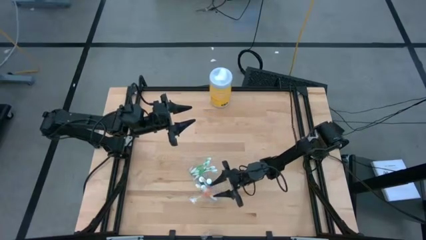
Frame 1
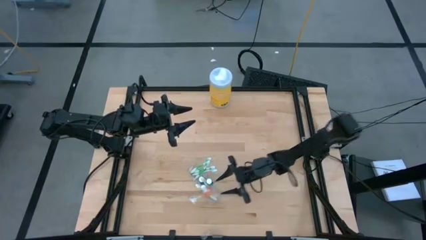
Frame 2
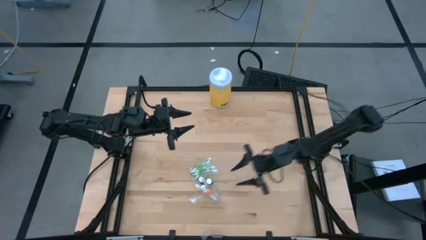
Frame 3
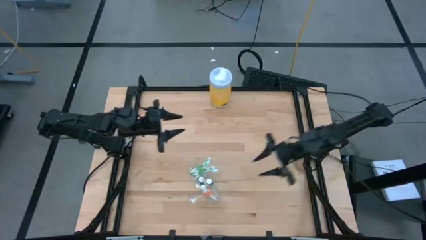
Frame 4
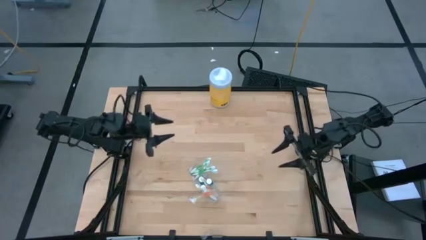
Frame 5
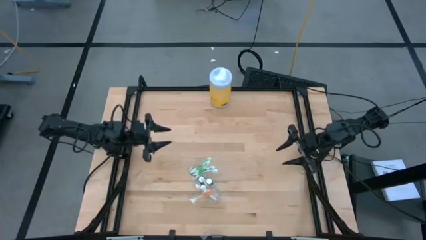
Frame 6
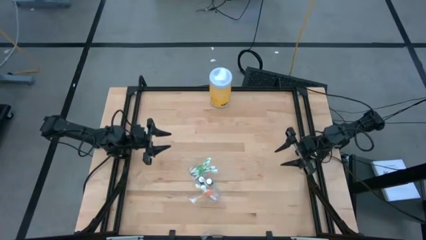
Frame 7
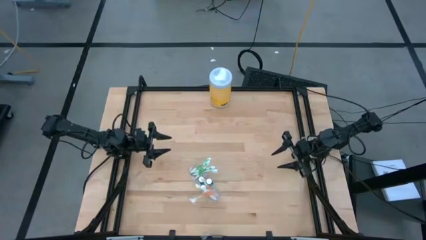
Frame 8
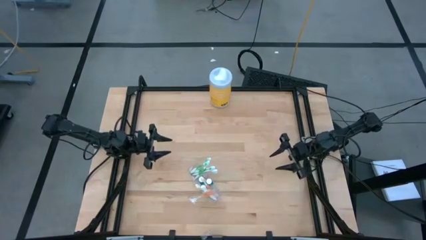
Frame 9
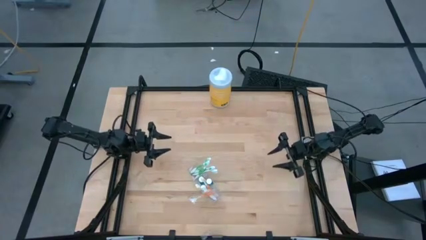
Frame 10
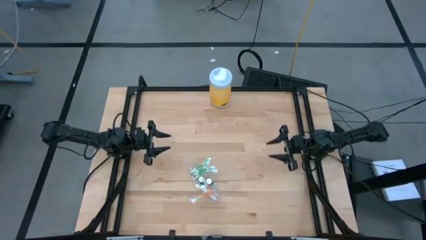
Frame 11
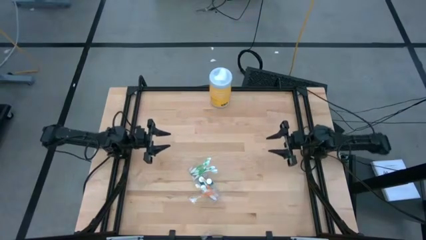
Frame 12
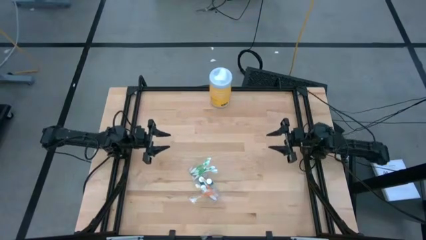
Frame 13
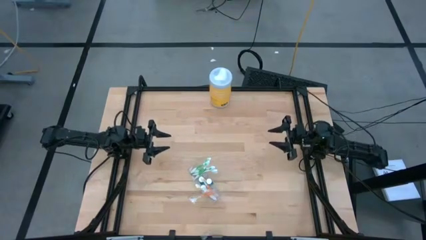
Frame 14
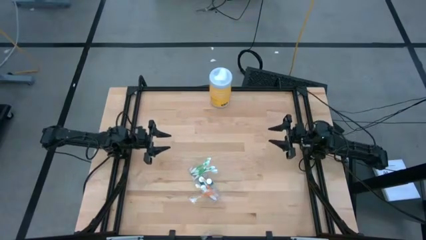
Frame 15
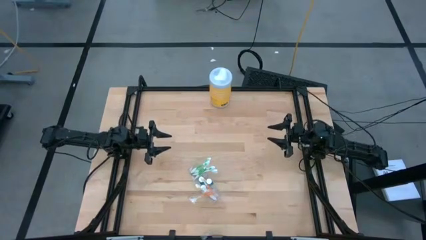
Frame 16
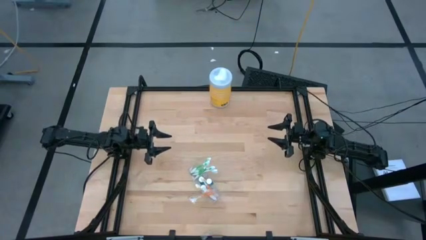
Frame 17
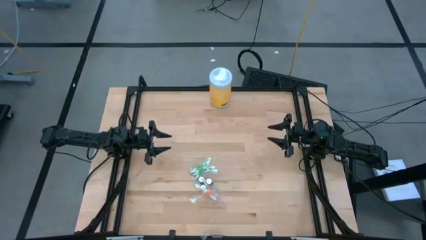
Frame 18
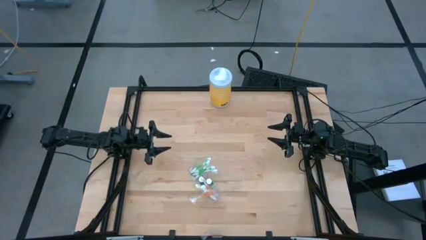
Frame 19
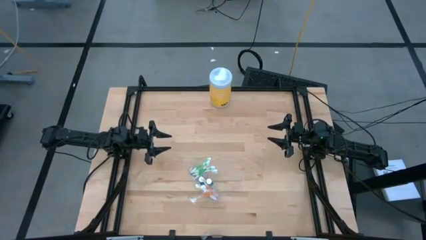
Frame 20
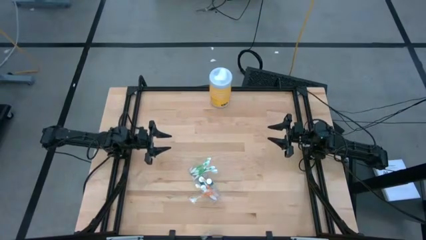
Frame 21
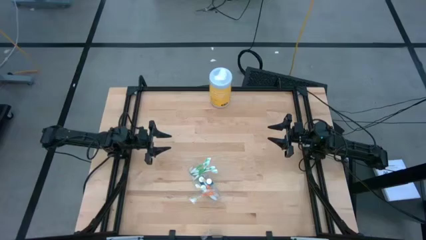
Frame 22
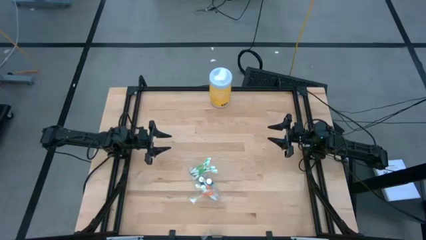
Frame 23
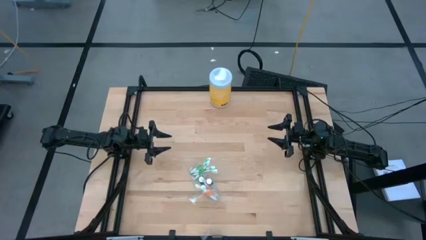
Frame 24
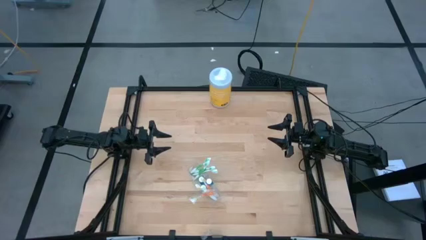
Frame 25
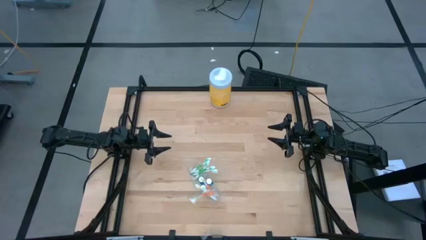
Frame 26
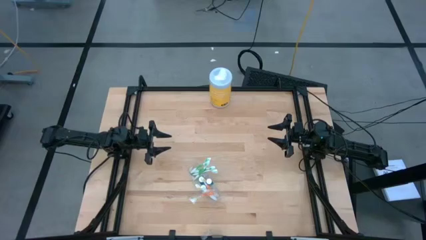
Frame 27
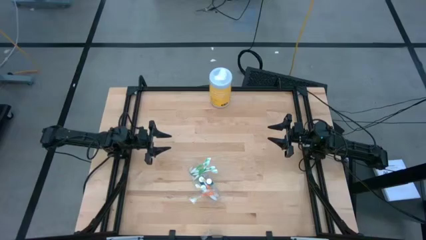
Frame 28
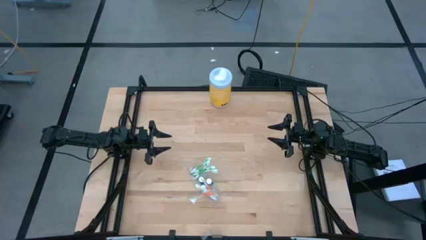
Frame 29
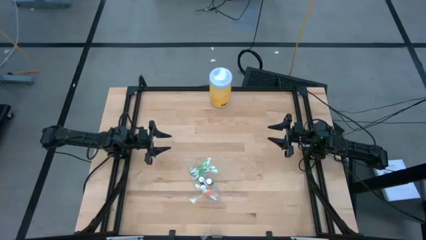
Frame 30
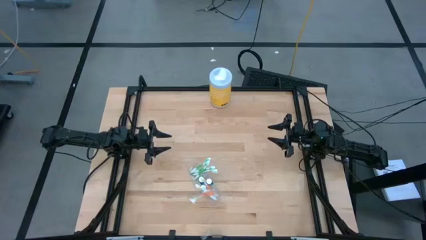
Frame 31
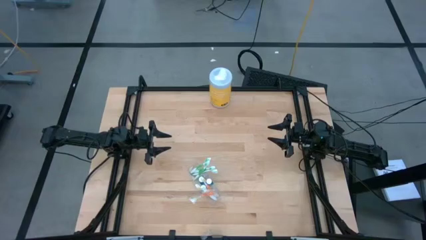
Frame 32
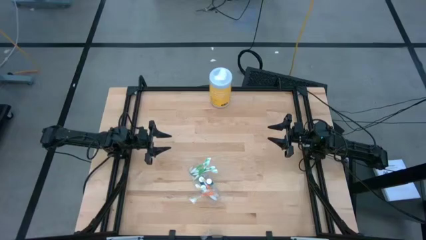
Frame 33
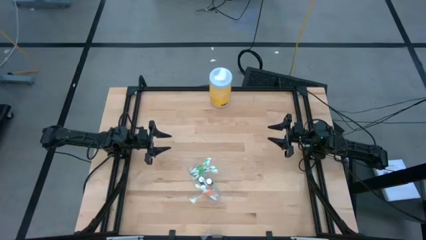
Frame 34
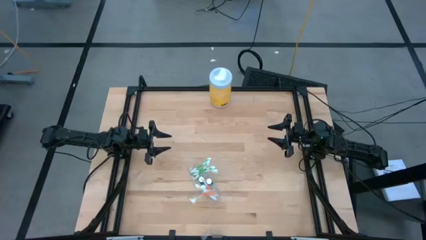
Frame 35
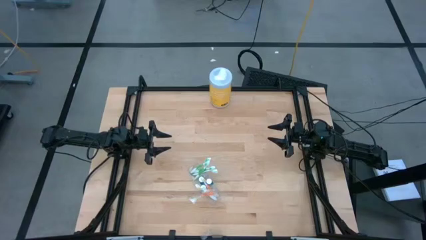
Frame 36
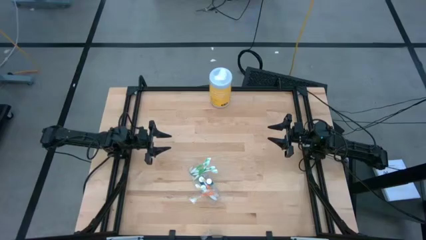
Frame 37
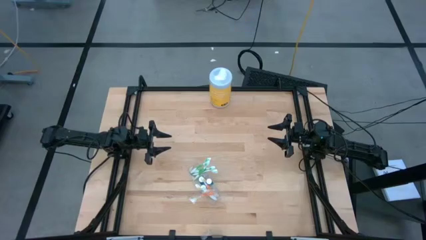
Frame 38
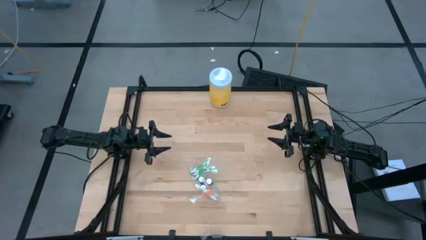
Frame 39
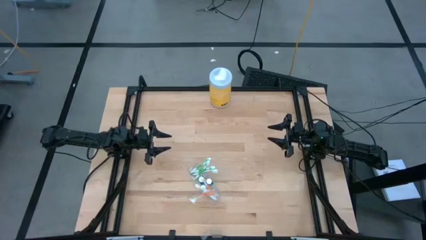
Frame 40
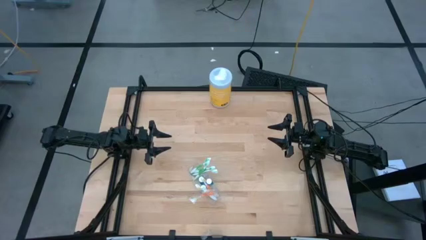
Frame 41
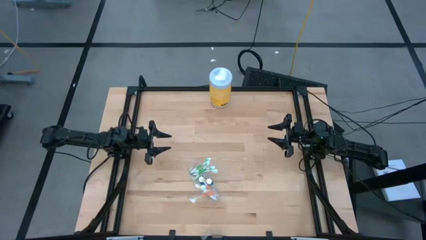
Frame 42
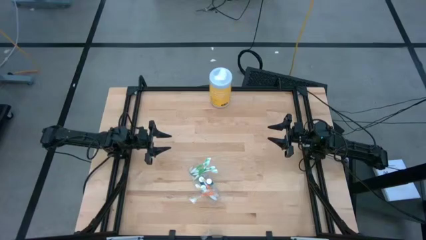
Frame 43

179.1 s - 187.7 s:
Task: Pick & Place toothbrushing station
Return to Home Position

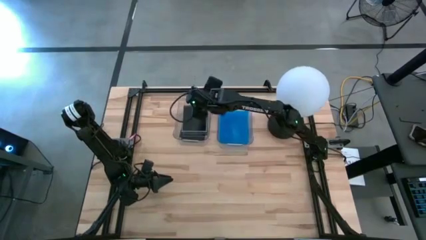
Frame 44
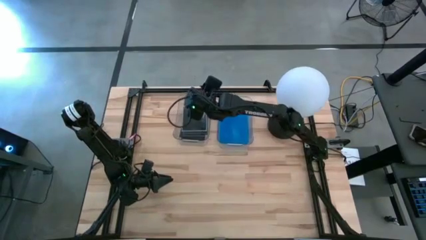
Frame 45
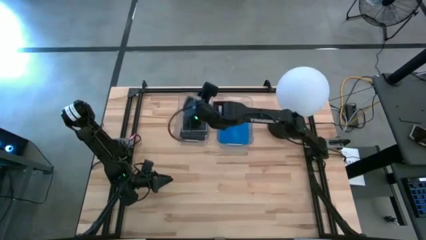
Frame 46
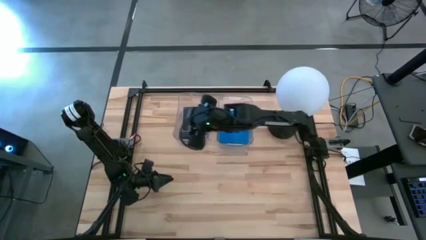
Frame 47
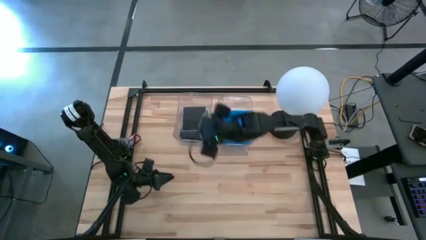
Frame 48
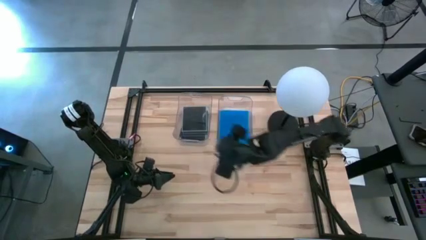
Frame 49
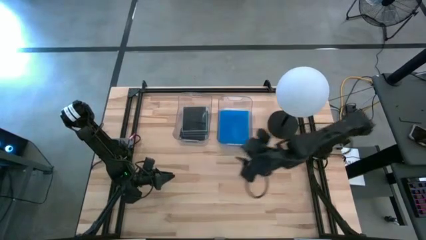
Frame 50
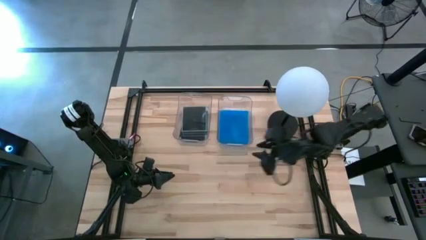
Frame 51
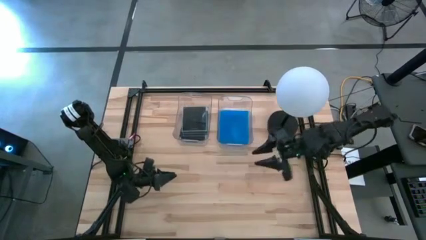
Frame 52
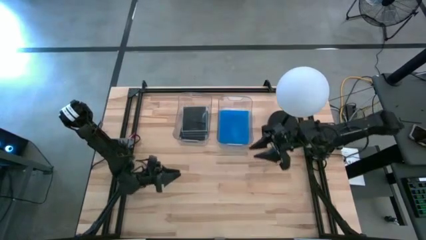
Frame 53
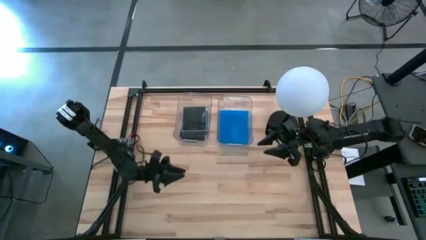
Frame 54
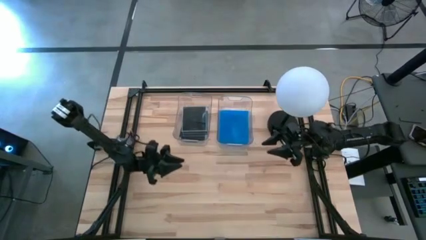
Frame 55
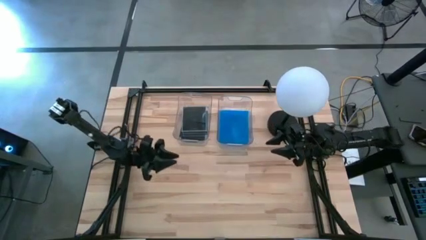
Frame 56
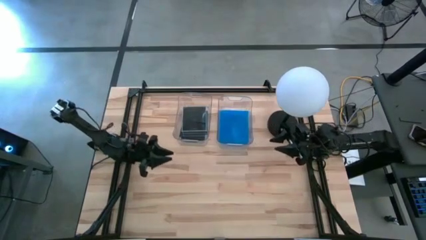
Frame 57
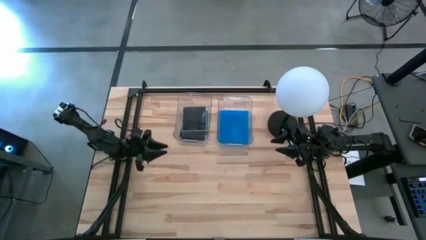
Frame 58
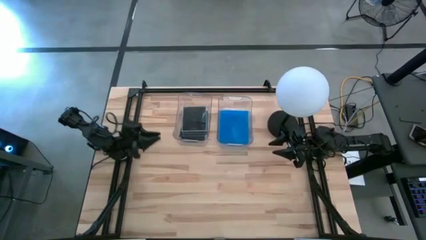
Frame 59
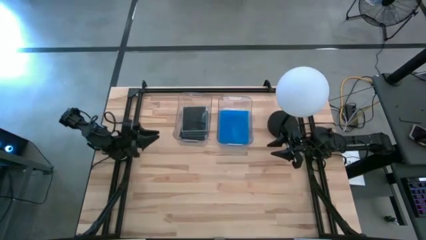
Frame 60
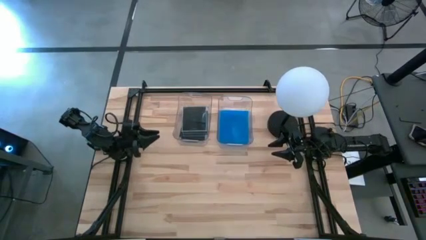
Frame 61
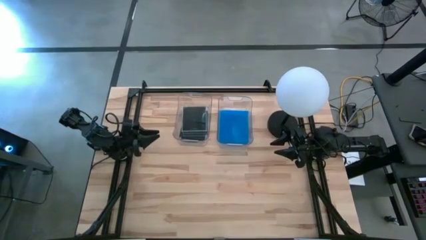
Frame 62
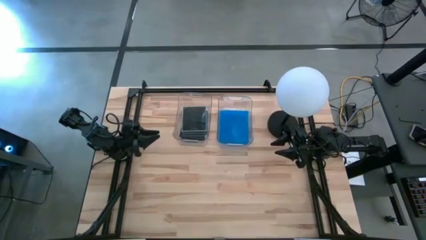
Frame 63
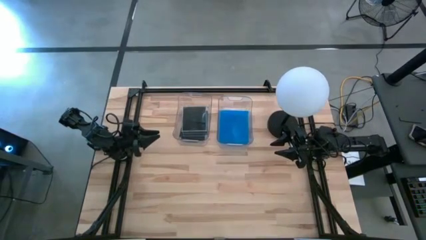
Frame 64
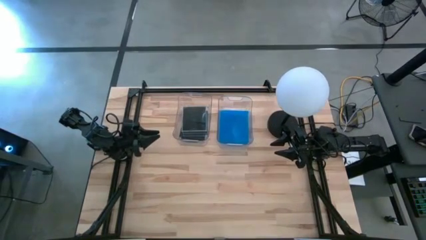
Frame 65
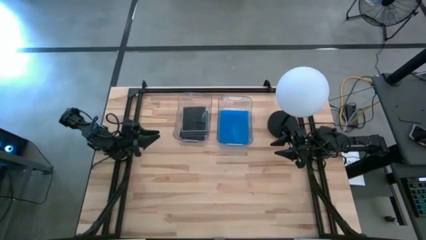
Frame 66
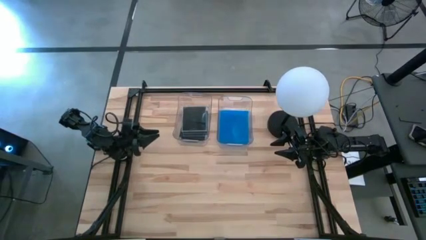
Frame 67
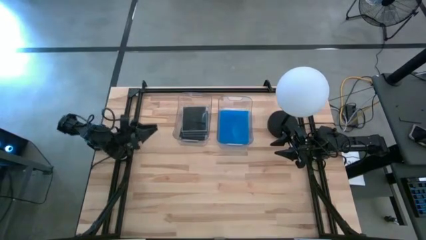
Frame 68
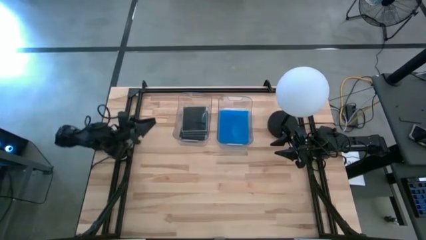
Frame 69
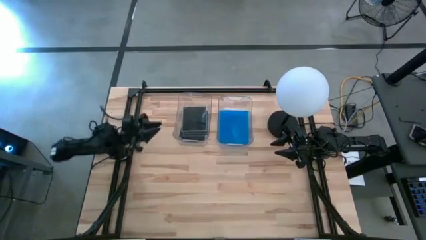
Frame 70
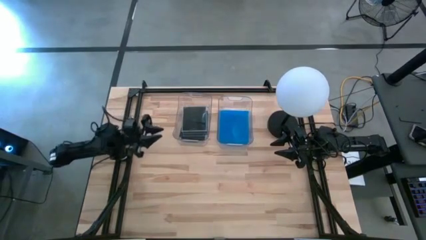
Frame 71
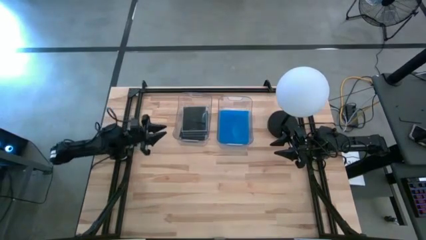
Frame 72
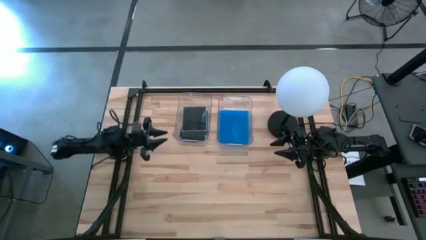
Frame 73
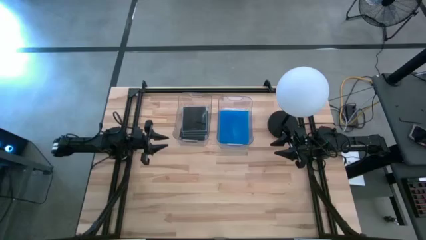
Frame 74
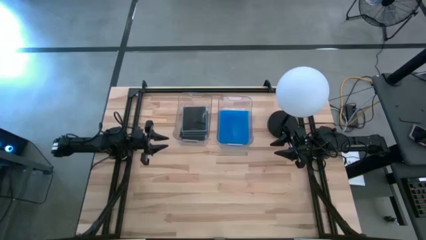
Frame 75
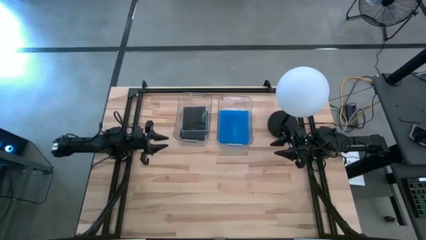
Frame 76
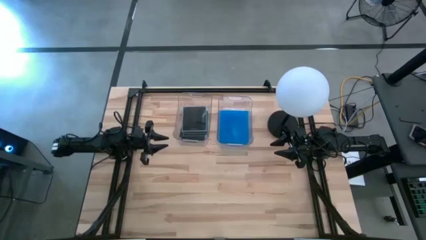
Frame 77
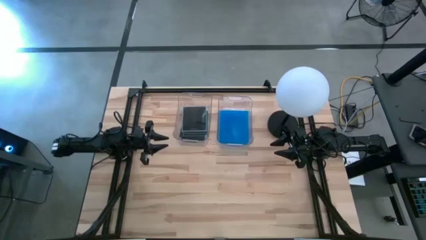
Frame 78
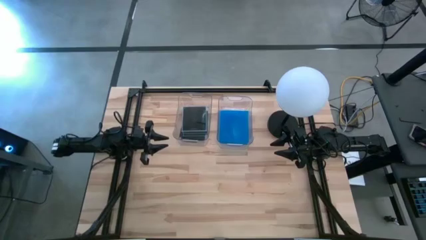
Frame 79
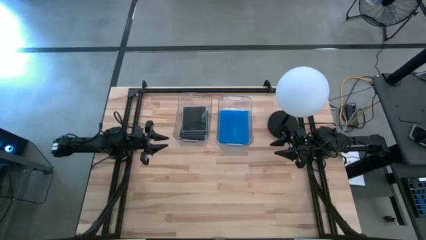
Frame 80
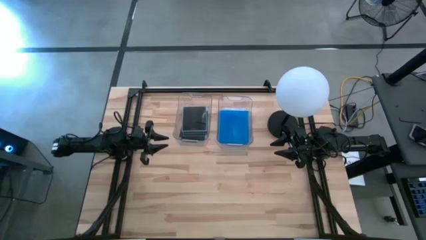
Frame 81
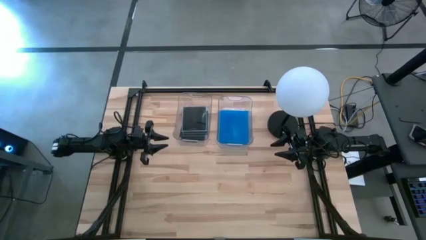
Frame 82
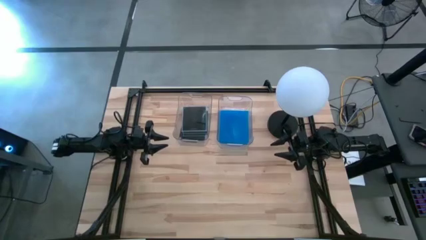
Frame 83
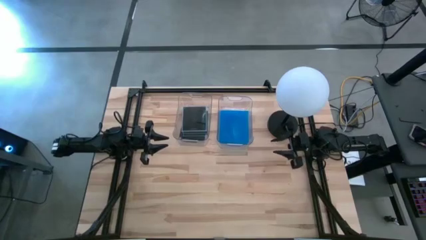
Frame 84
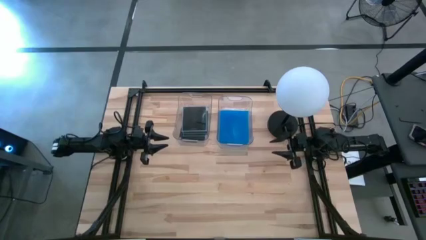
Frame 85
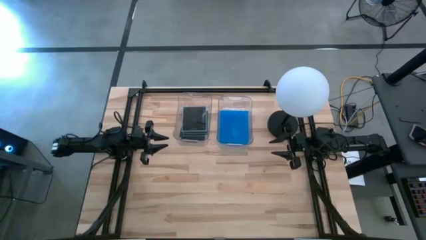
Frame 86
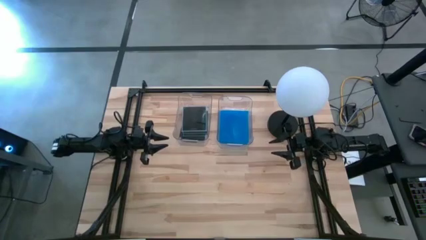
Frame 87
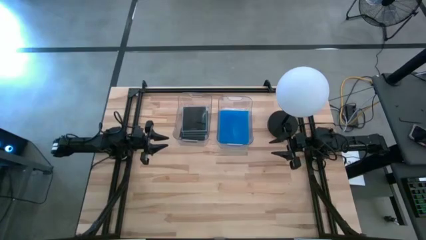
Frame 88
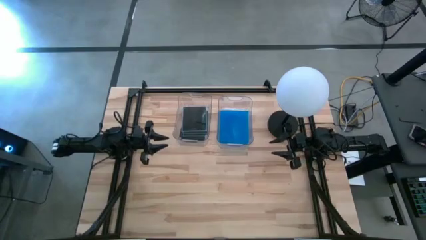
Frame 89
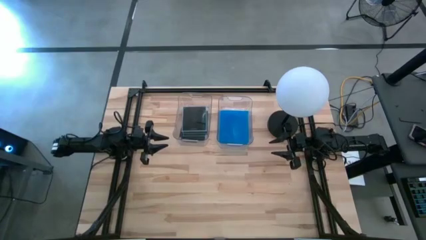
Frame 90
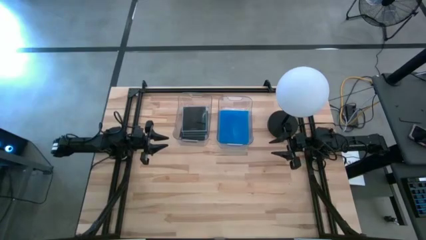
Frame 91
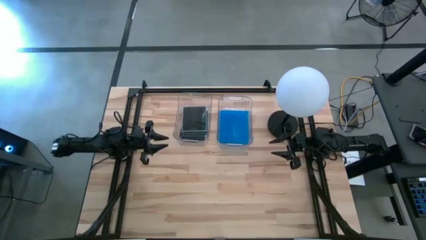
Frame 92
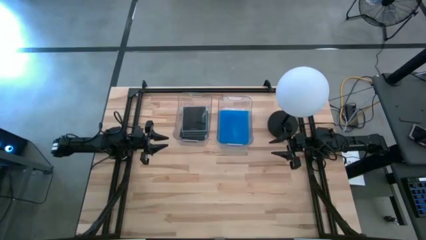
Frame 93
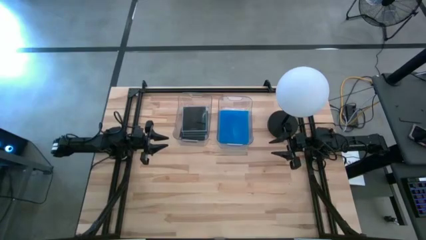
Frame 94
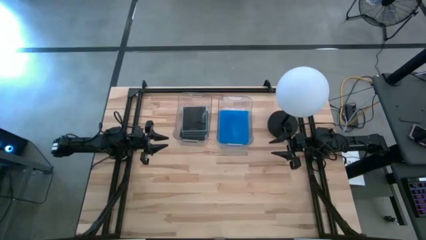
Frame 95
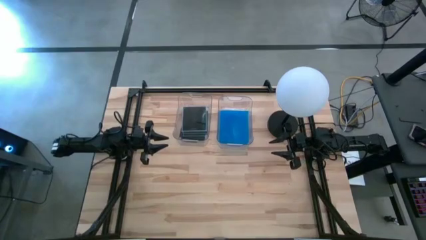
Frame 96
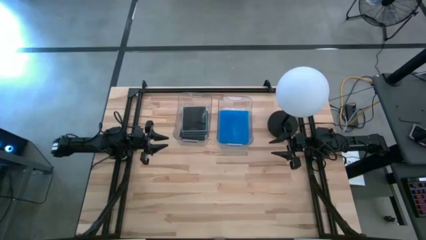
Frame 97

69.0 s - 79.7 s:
Task: Pick & place jewel cases by type
Return to Home Position
